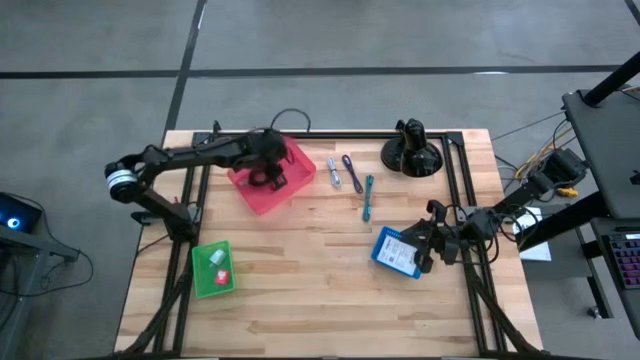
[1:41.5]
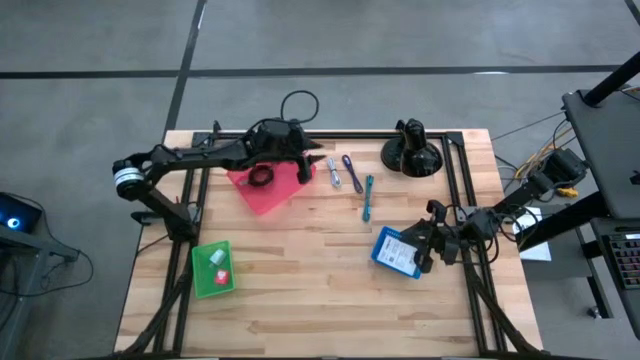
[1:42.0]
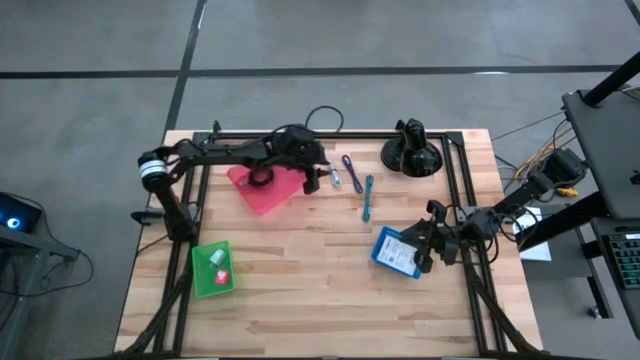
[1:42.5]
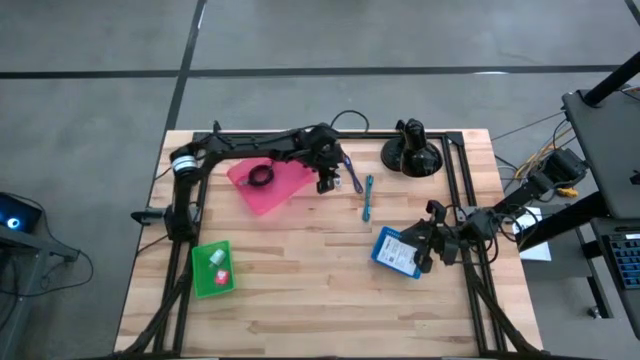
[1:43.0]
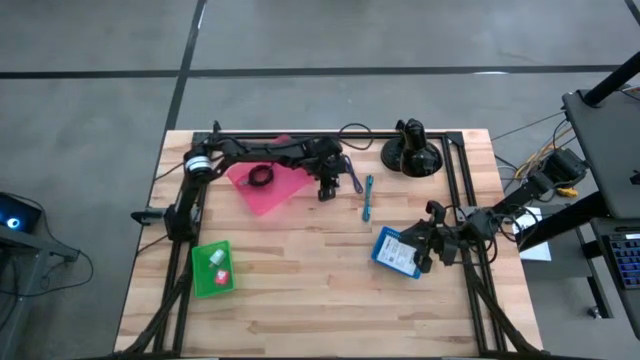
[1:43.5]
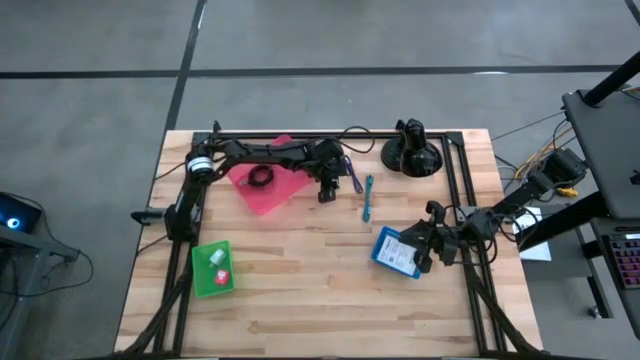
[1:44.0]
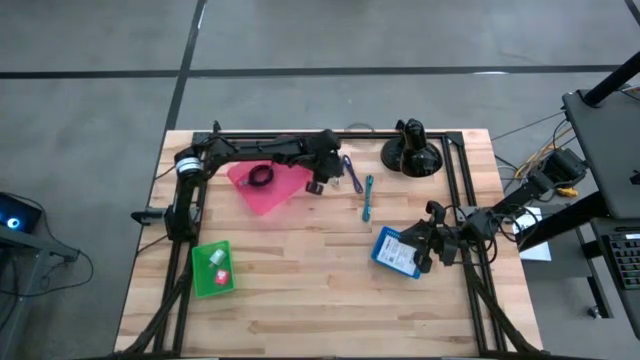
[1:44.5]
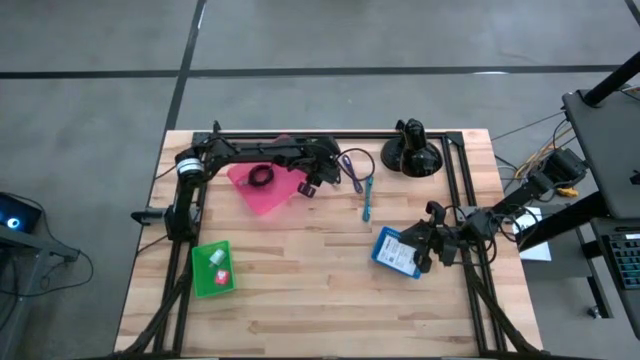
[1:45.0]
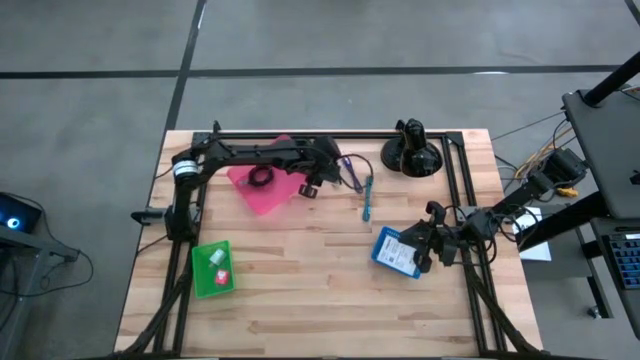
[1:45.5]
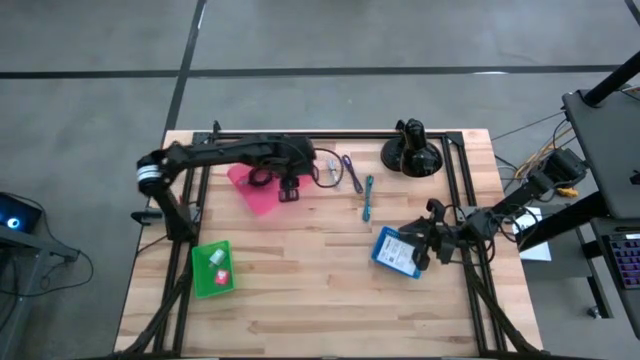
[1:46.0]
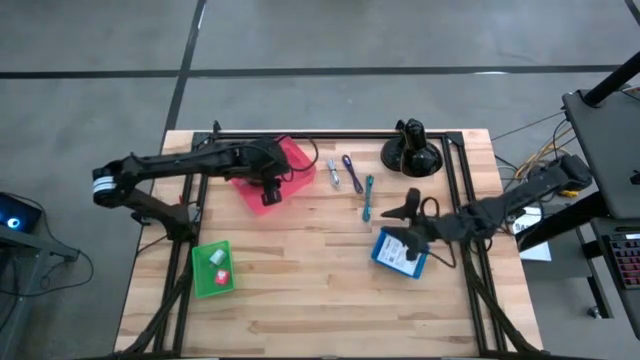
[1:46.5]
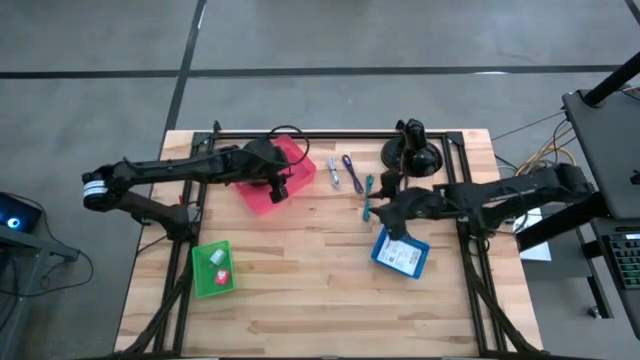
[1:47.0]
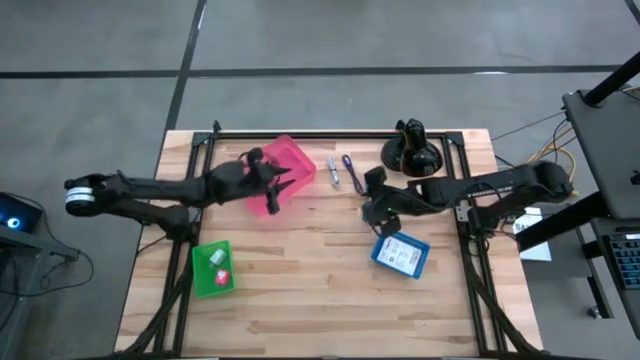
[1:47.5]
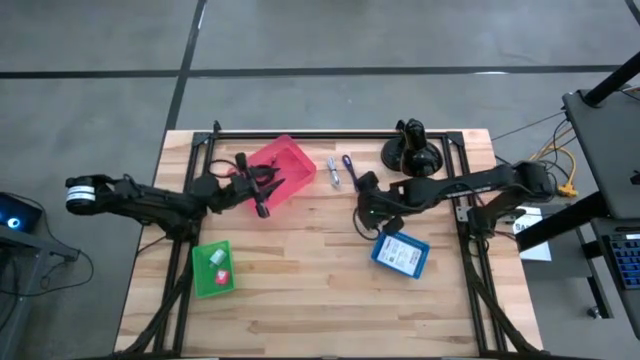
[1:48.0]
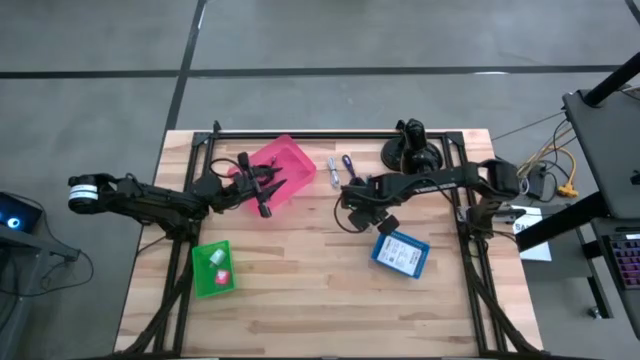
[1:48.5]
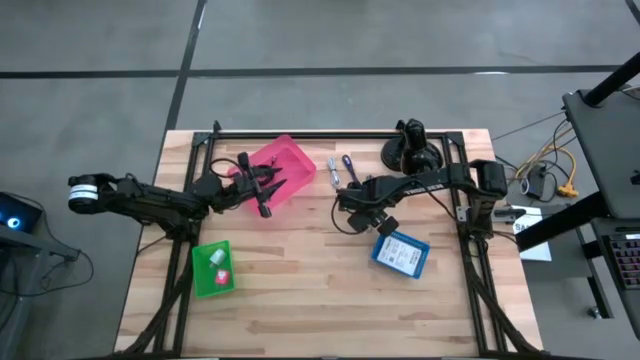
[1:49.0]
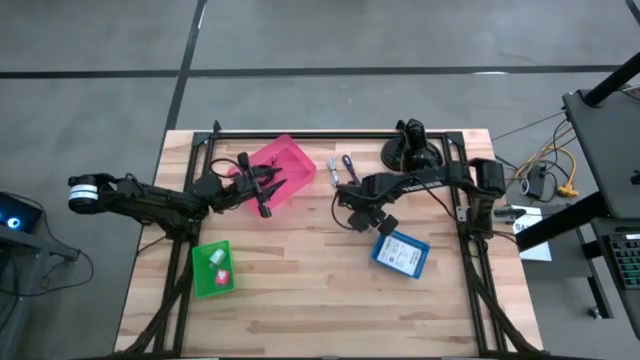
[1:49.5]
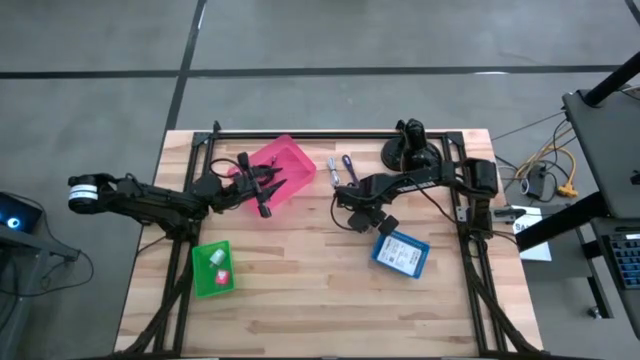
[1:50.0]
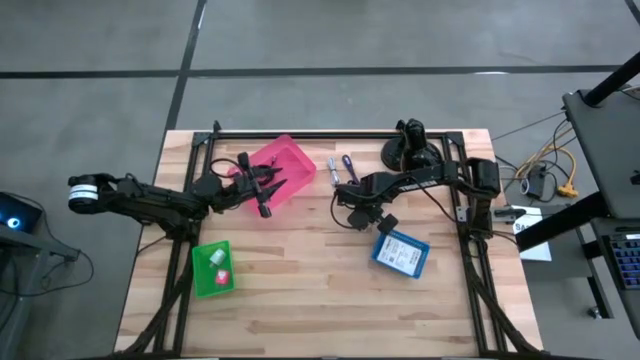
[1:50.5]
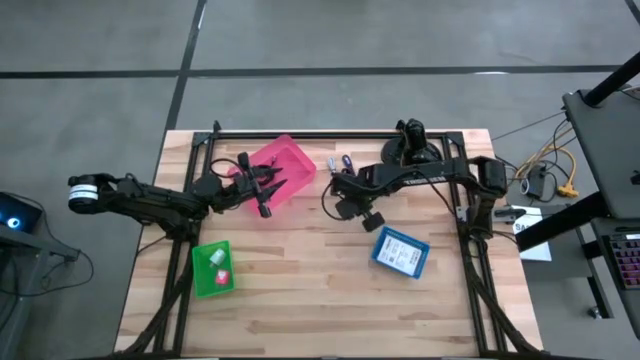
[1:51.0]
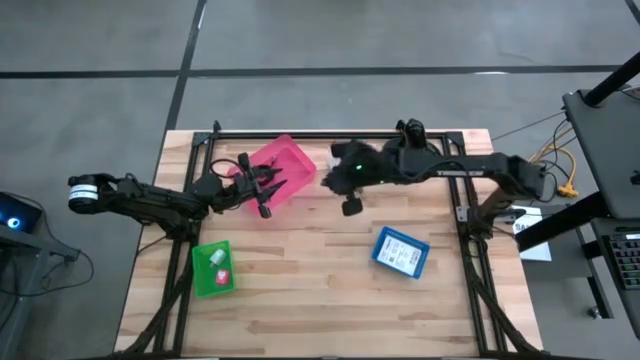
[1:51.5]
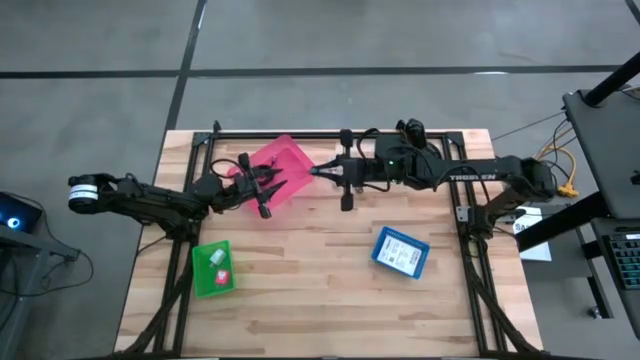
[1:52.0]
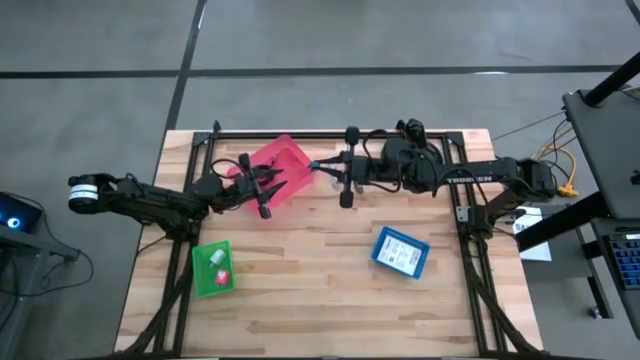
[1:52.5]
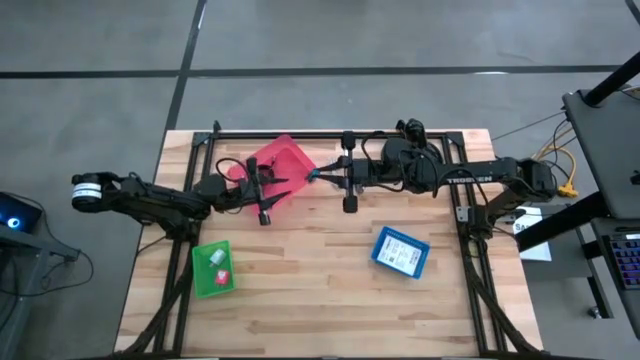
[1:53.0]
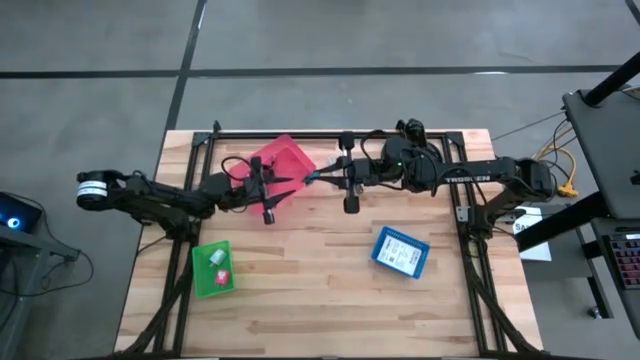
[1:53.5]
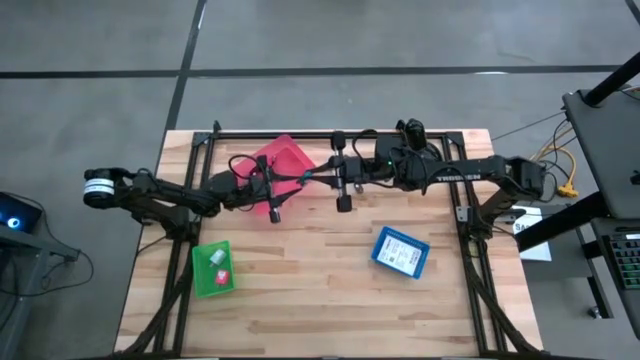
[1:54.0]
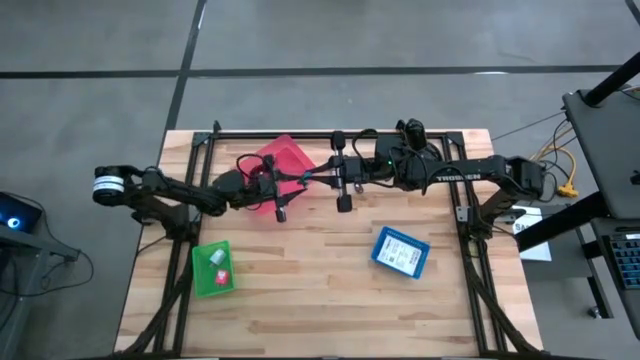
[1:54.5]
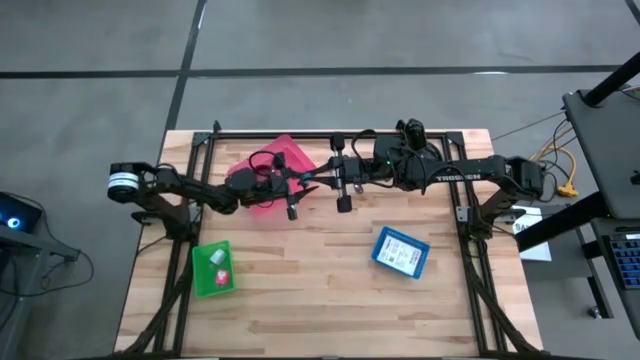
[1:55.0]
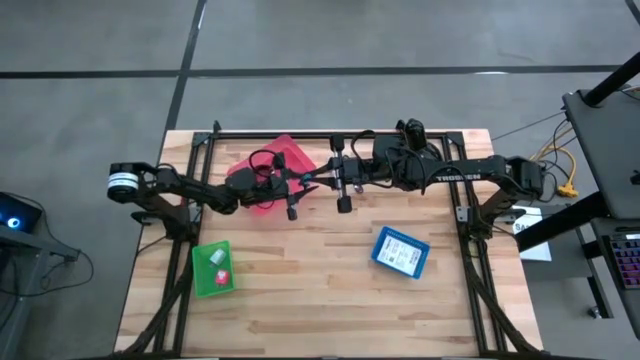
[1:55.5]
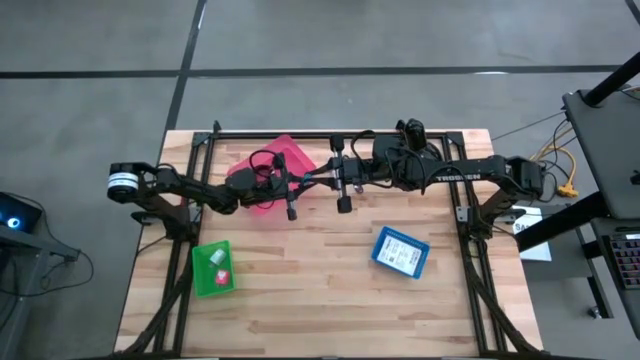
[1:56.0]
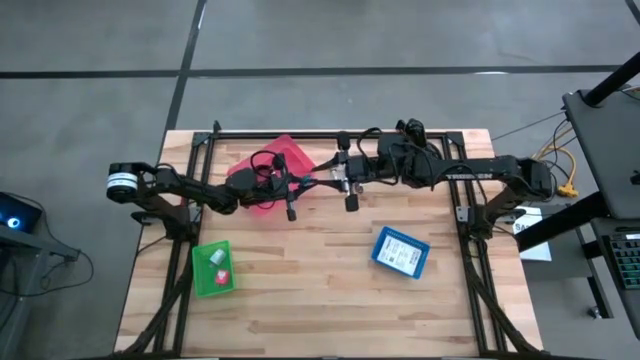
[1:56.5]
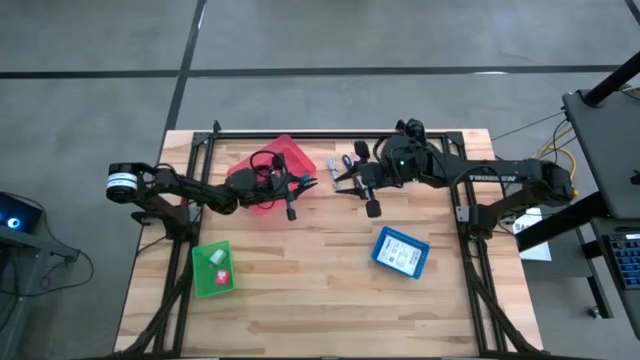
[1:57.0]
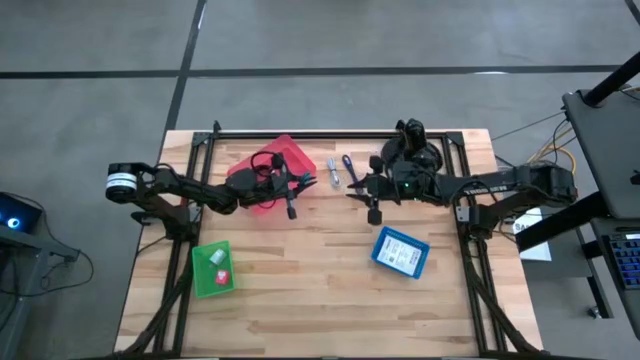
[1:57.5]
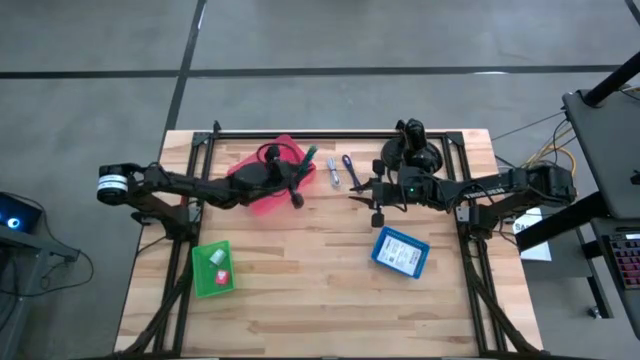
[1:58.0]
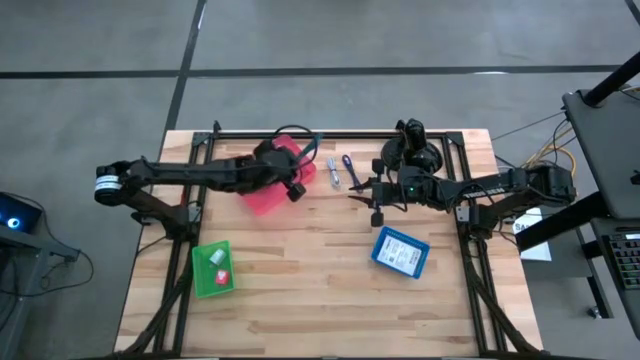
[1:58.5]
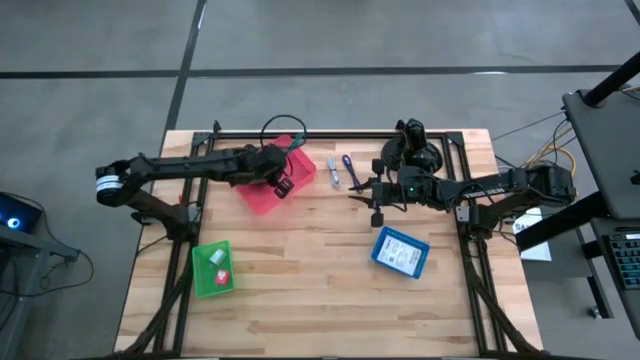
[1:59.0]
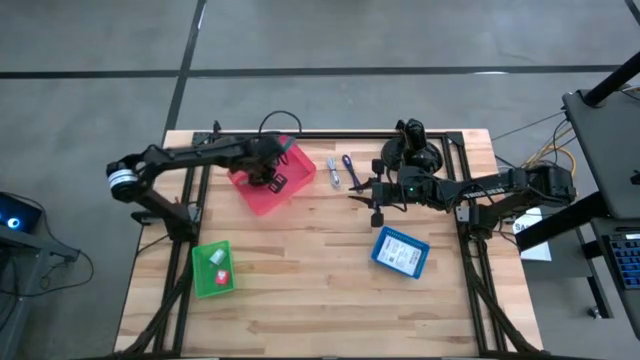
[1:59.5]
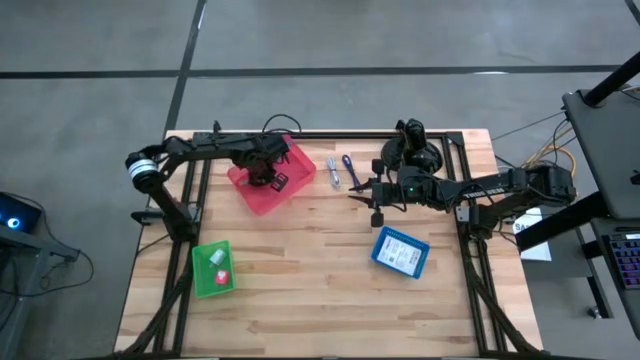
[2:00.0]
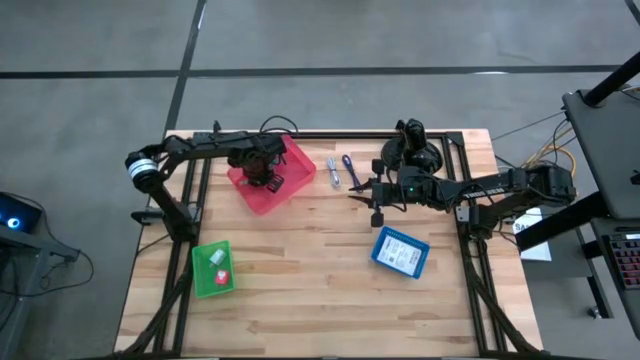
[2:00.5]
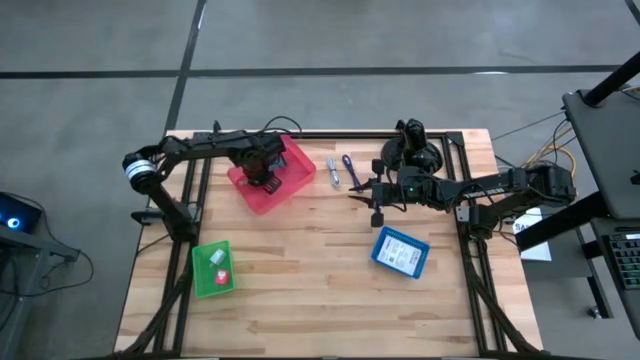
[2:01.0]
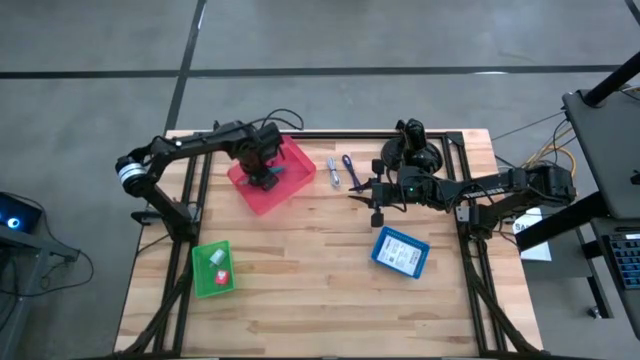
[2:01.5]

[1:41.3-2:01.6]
Task: Pick and place items into bin
Put the blue charger cable into the red bin
